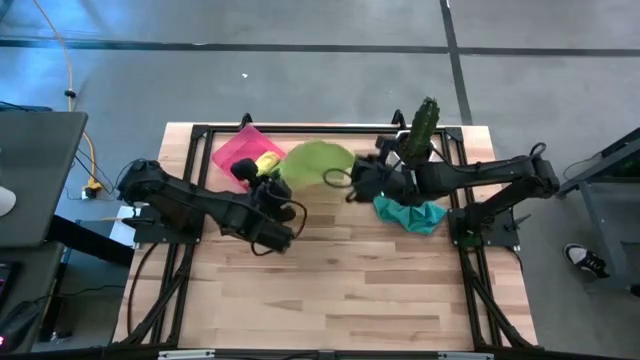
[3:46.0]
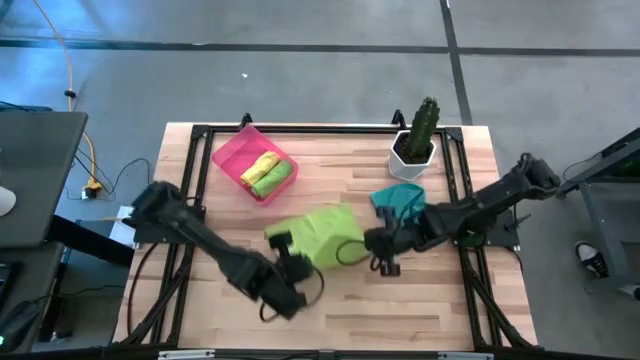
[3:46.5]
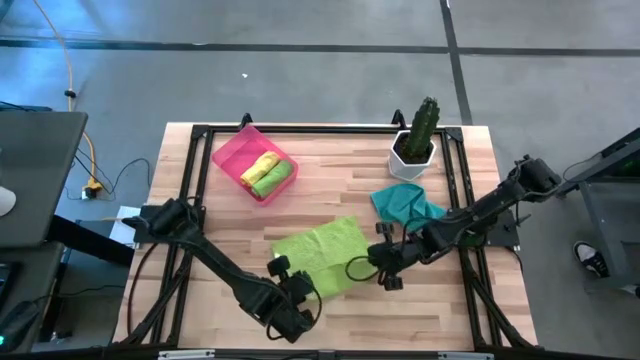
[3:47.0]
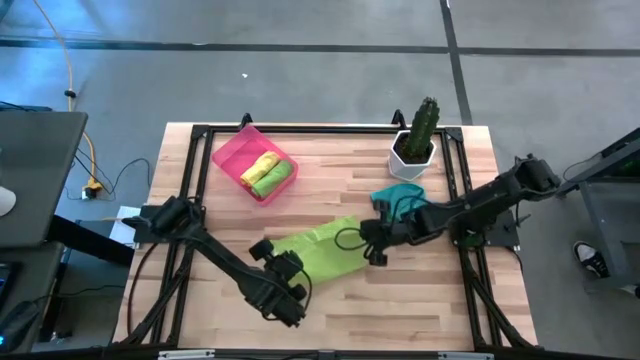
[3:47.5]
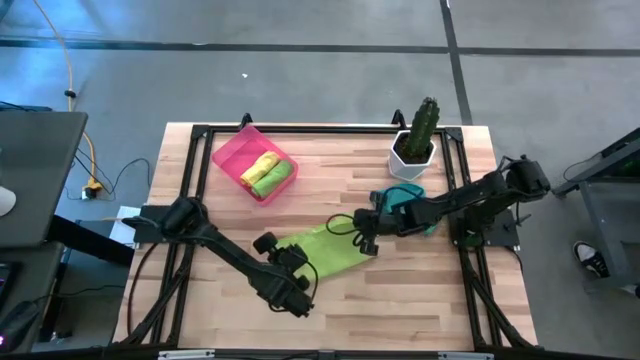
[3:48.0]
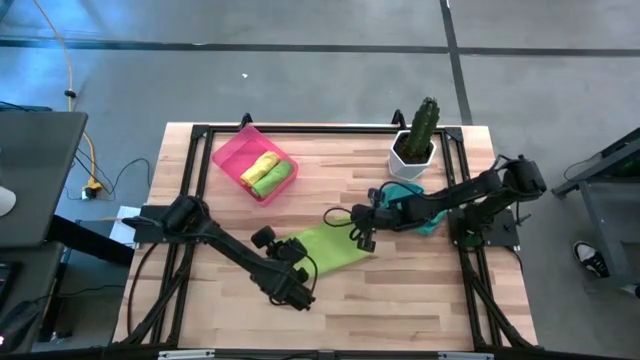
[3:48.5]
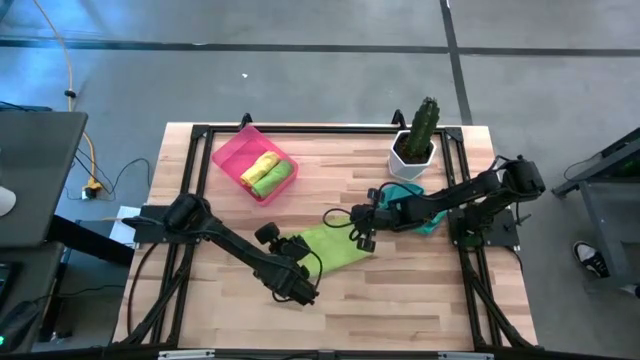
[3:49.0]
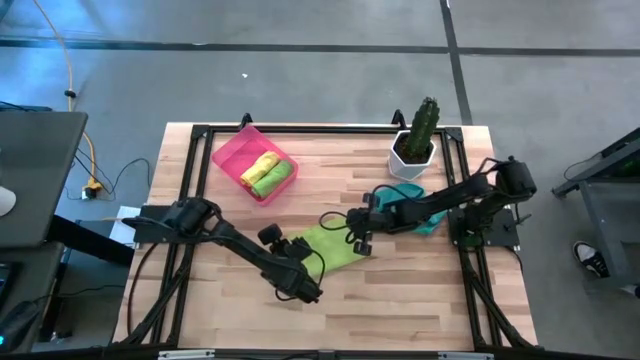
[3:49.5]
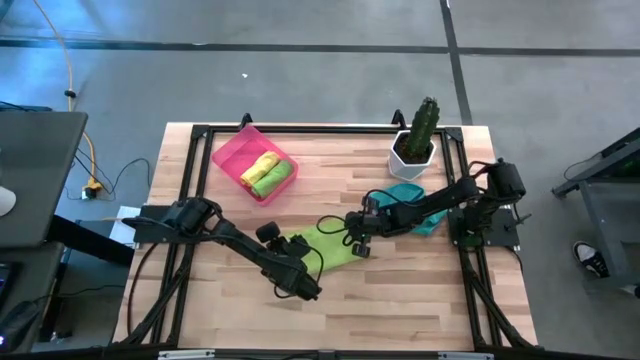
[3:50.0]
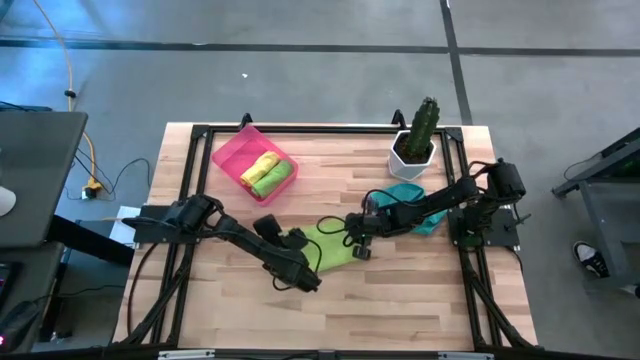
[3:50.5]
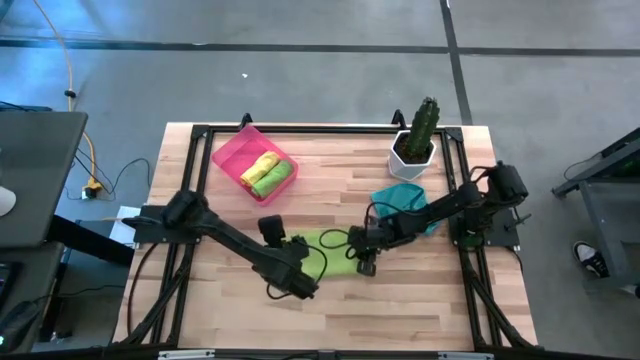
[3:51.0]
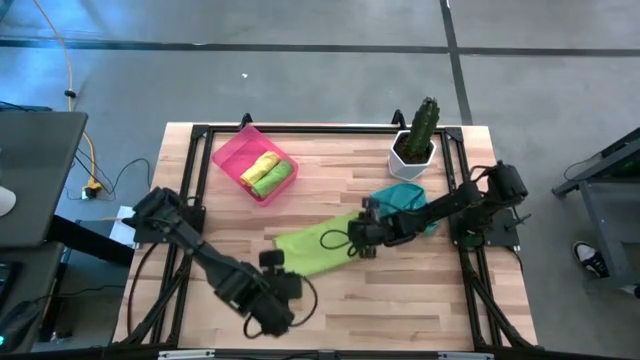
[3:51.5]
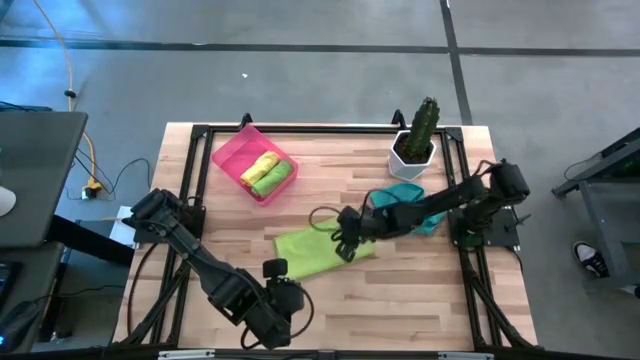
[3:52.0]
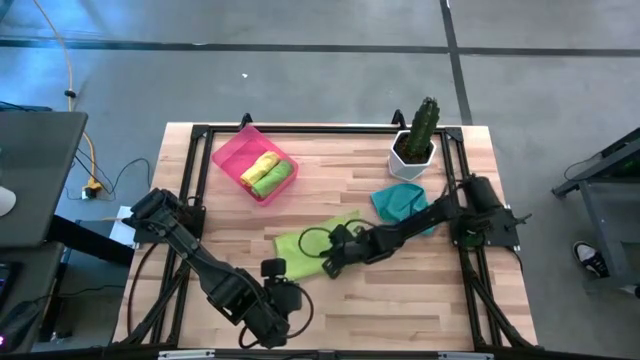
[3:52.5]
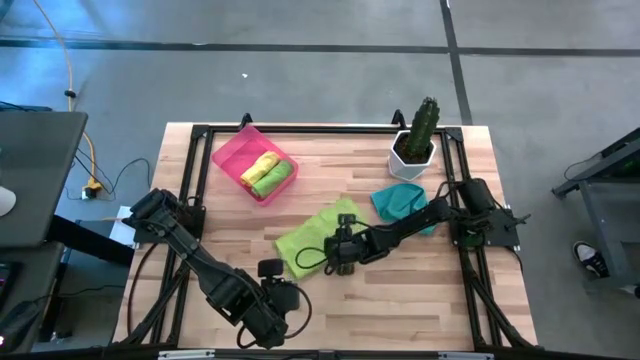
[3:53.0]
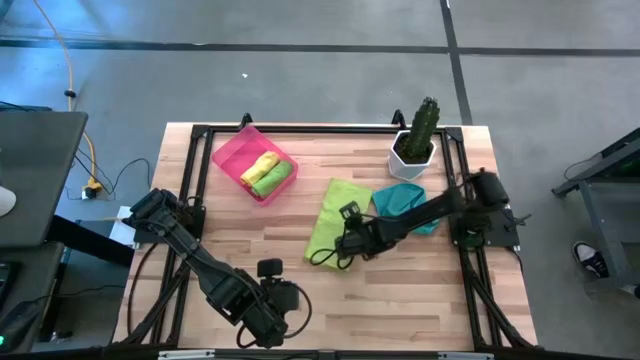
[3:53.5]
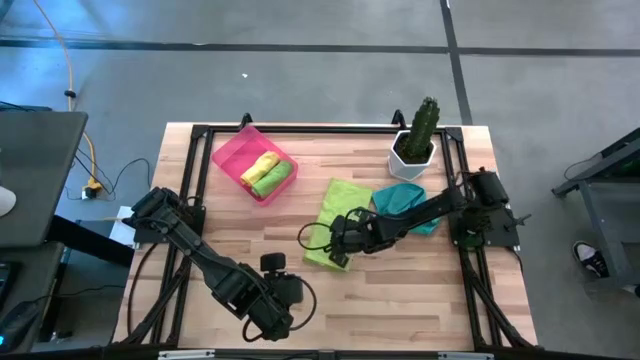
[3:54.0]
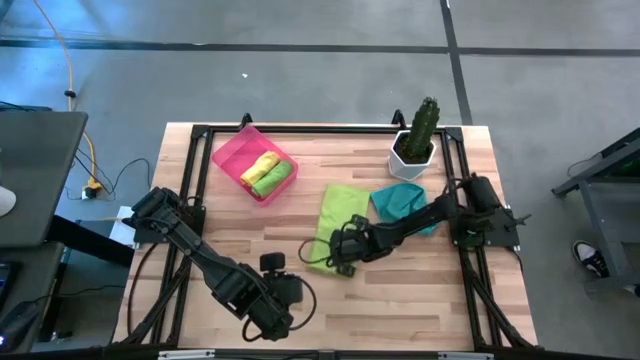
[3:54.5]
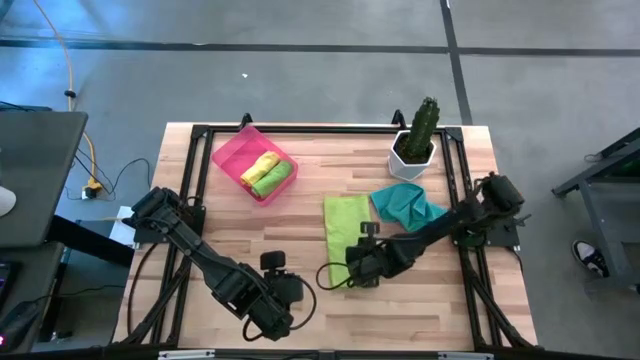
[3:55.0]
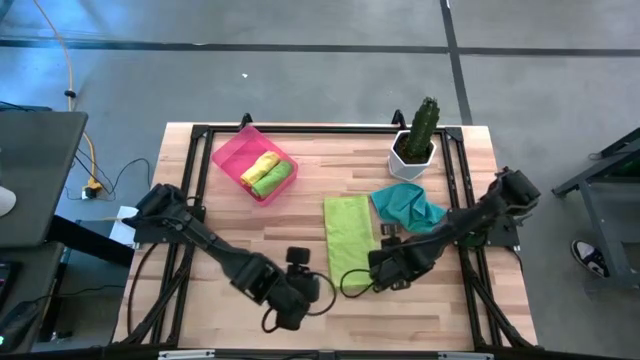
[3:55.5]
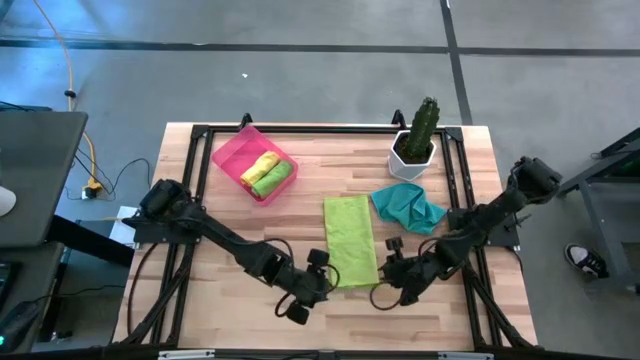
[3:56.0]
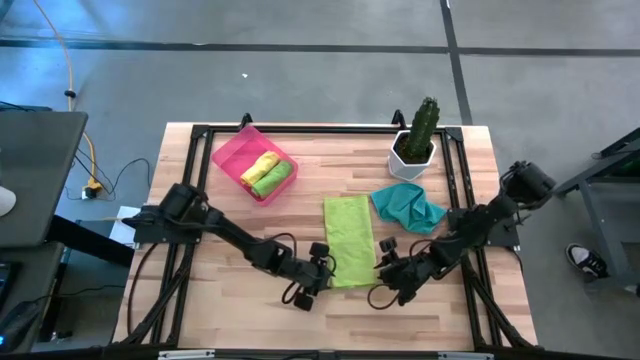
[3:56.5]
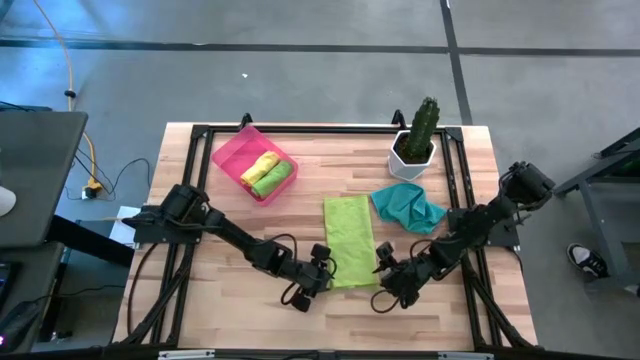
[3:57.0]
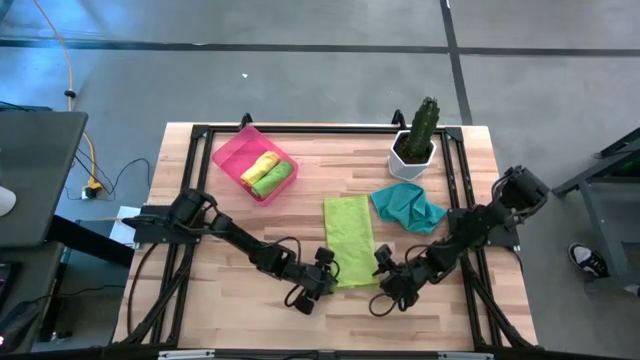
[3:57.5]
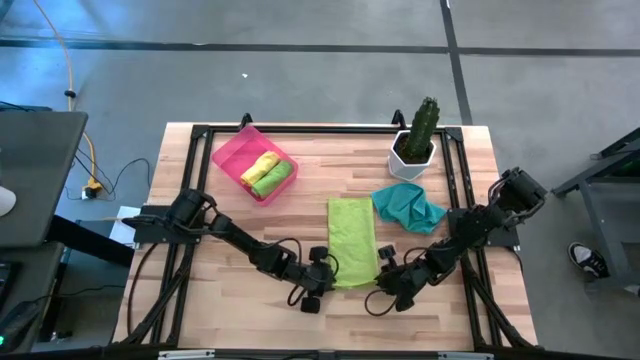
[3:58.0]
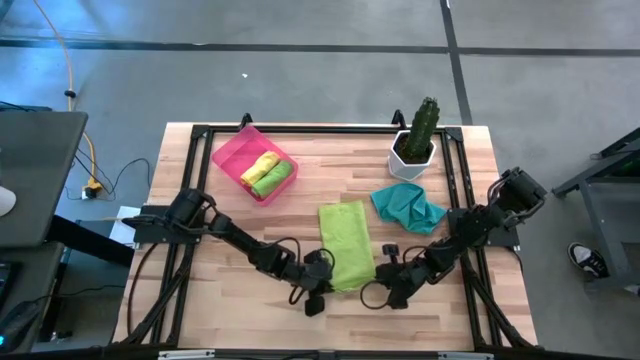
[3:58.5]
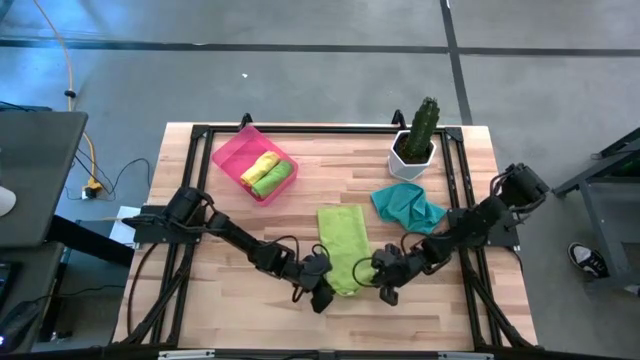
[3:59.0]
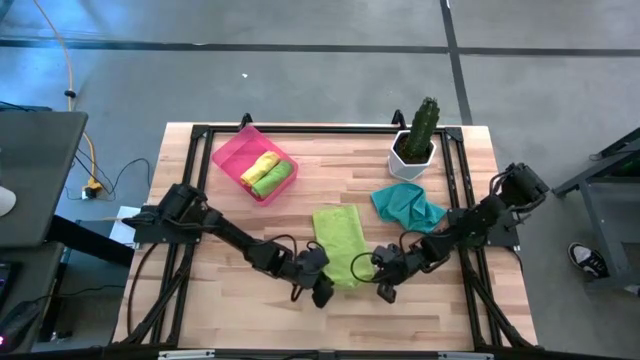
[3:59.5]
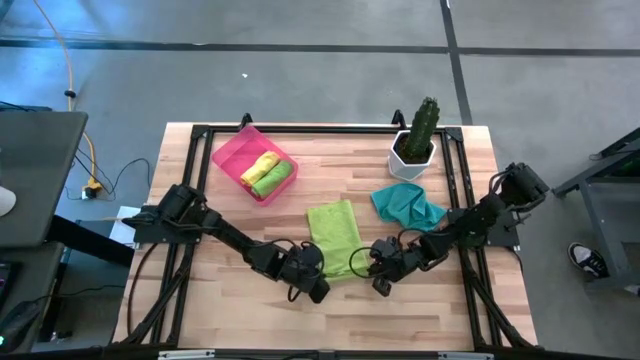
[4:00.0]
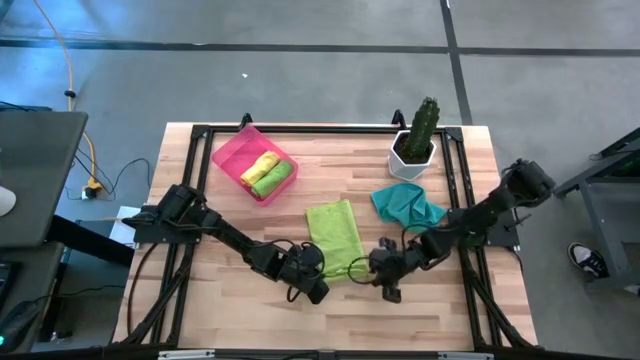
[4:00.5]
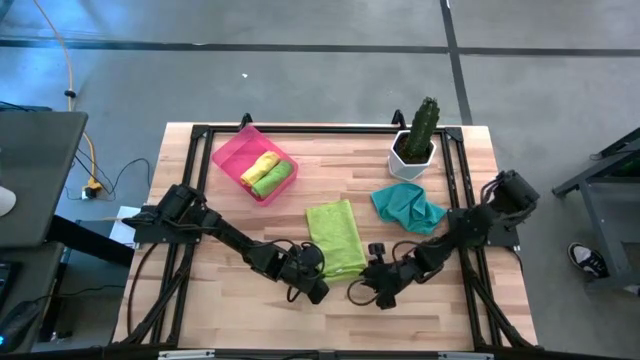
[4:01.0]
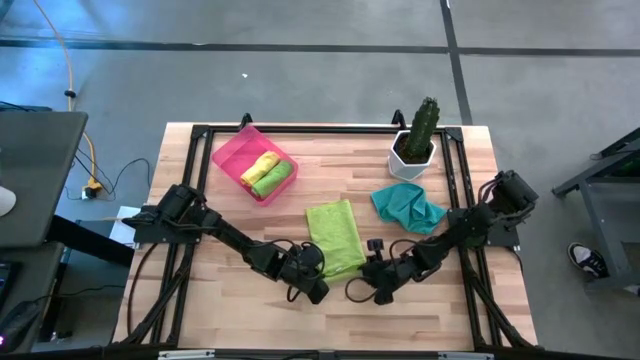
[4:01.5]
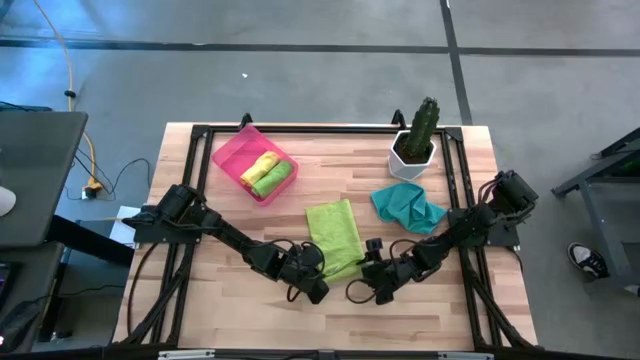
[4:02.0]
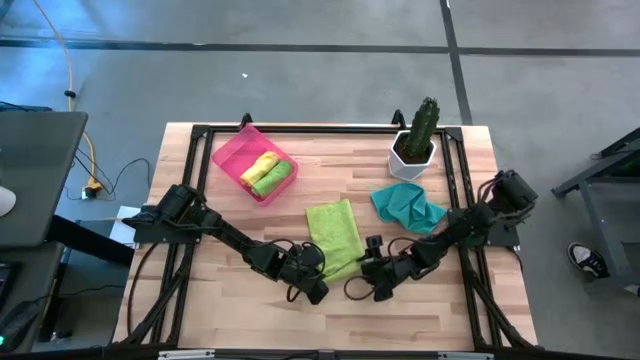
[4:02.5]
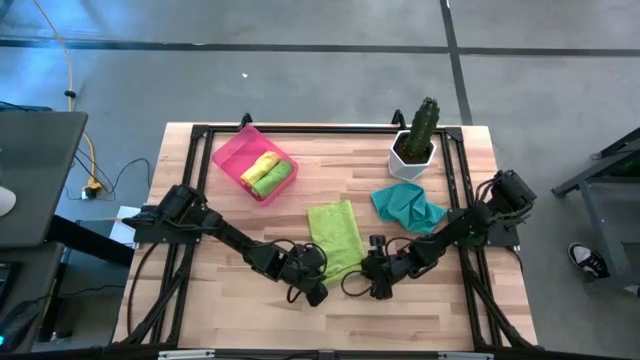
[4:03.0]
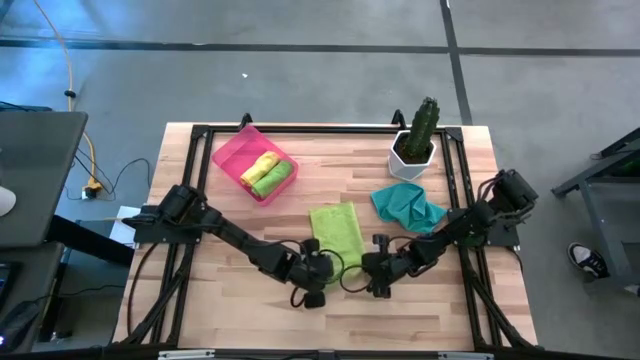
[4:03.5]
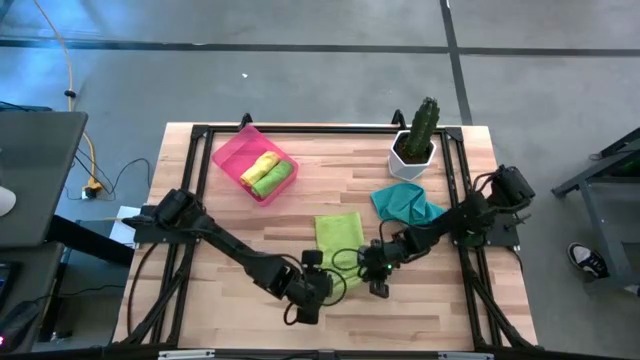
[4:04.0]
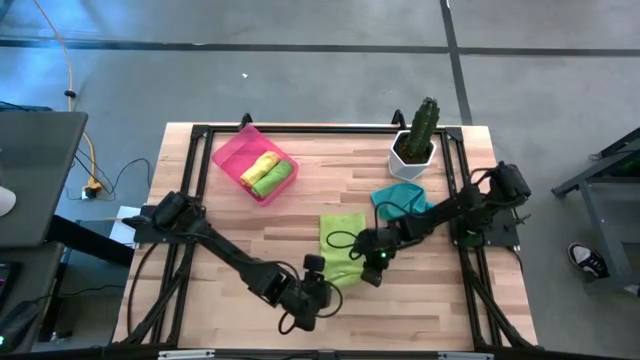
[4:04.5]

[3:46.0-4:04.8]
Task: Roll microfiber towels into tight, uniform cylinder then place into a basket
Roll the light green microfiber cloth

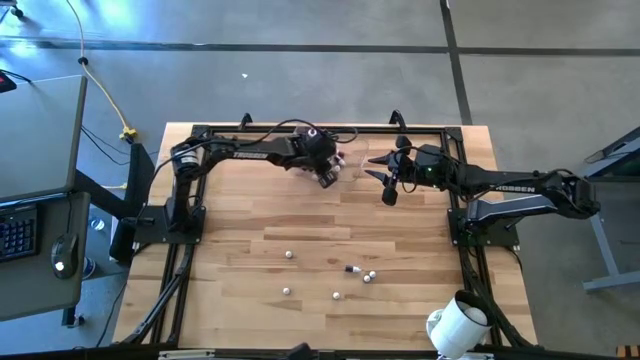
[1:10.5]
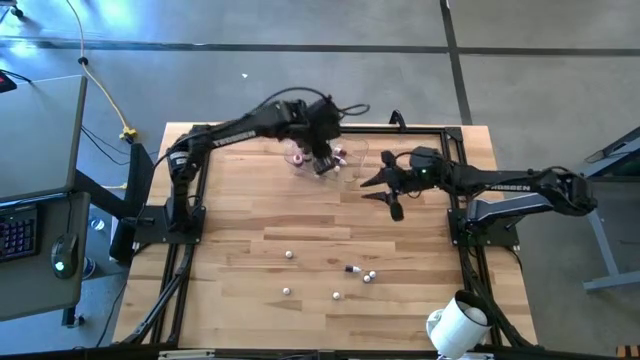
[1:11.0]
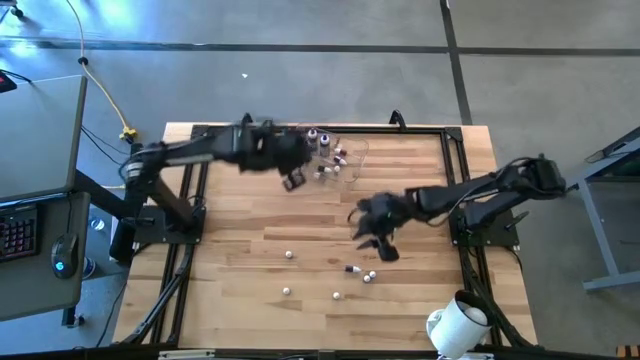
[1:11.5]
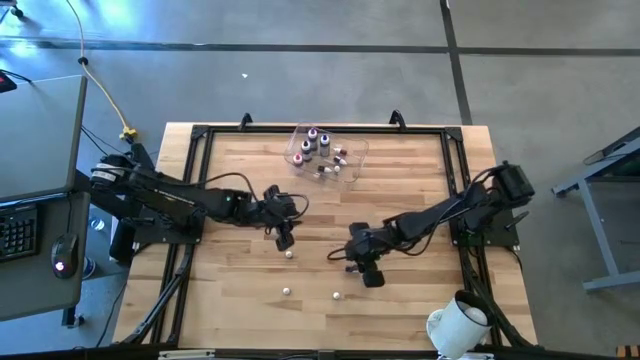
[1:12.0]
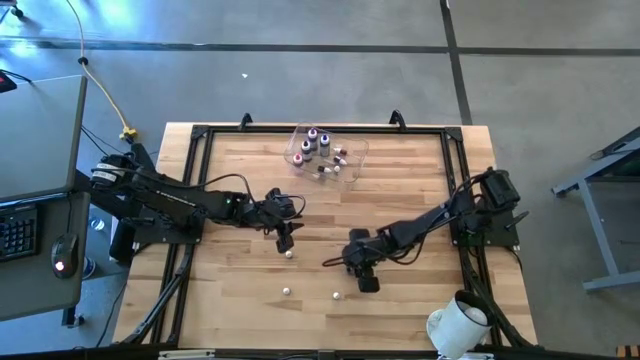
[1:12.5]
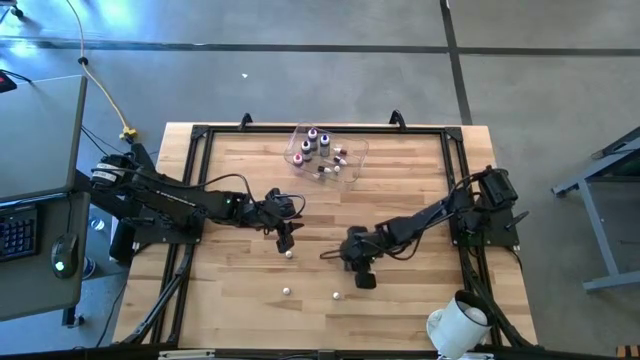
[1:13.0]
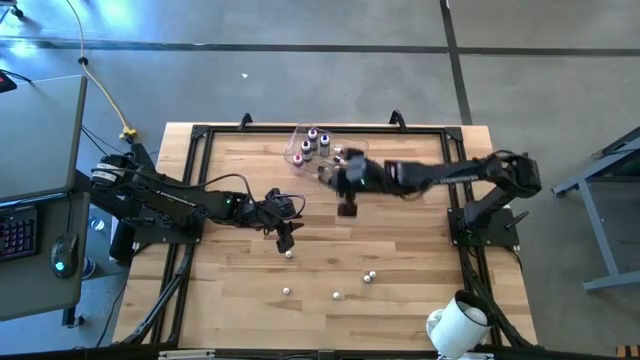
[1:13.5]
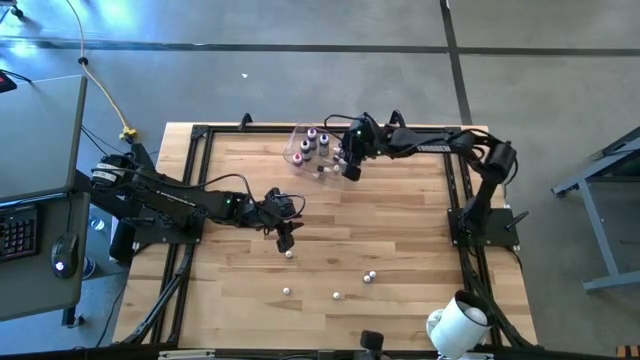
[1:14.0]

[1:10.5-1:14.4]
Task: Pick & Place food coloring
Put the purple food coloring into the transparent bin
